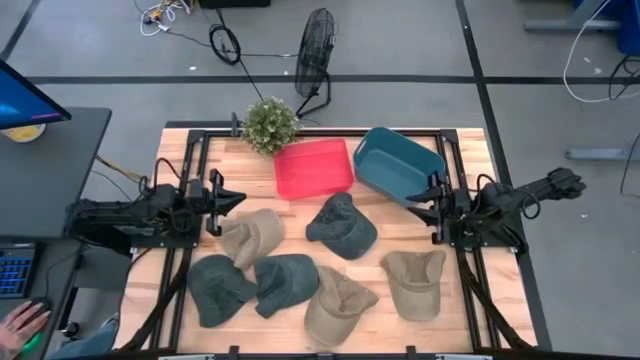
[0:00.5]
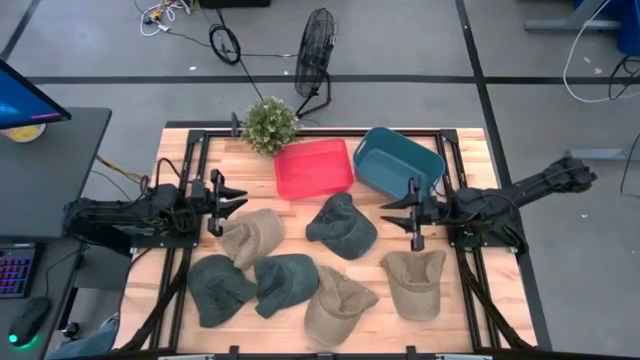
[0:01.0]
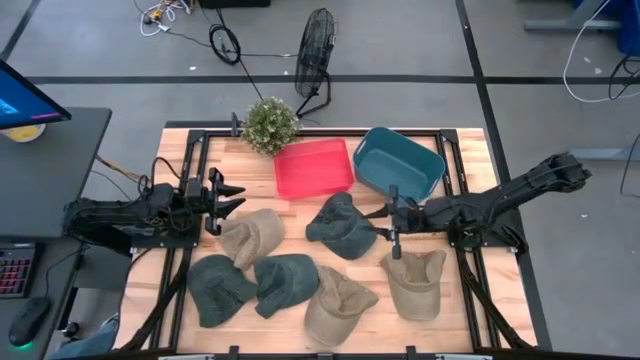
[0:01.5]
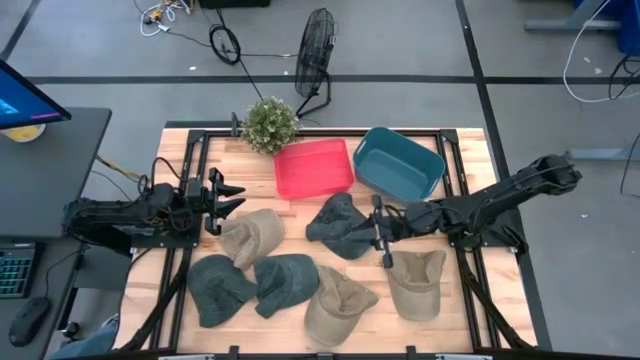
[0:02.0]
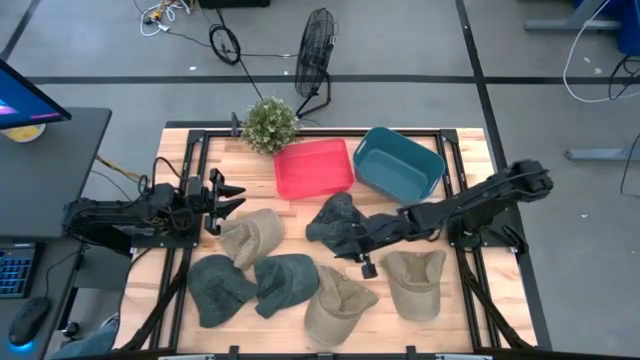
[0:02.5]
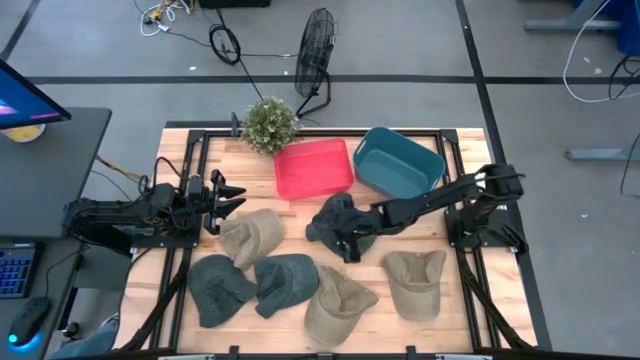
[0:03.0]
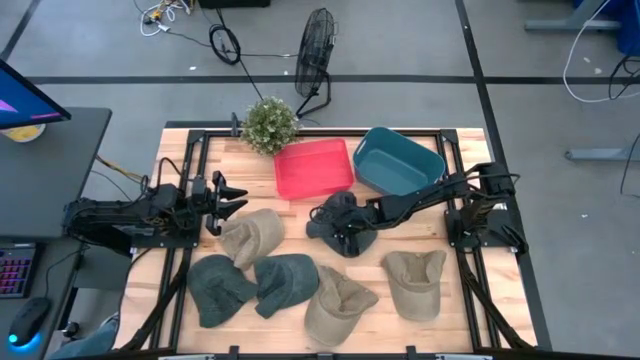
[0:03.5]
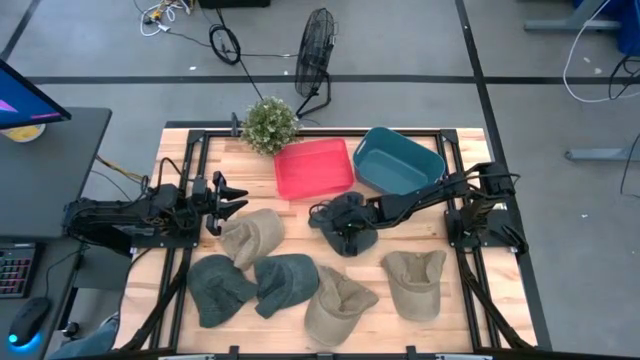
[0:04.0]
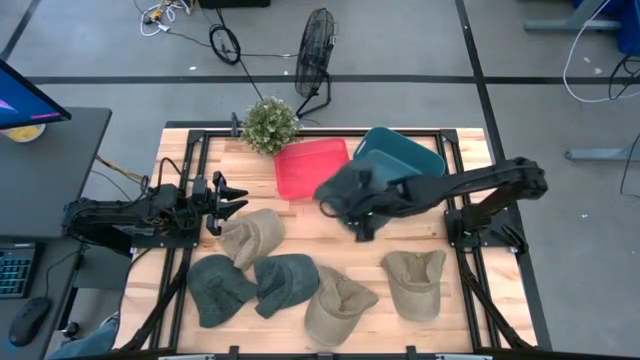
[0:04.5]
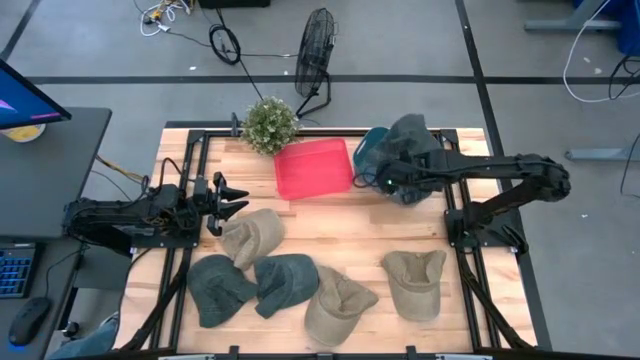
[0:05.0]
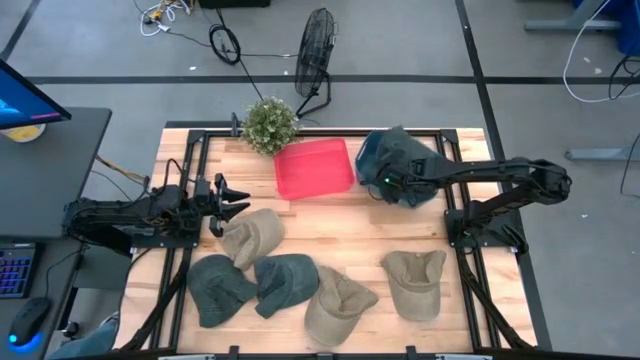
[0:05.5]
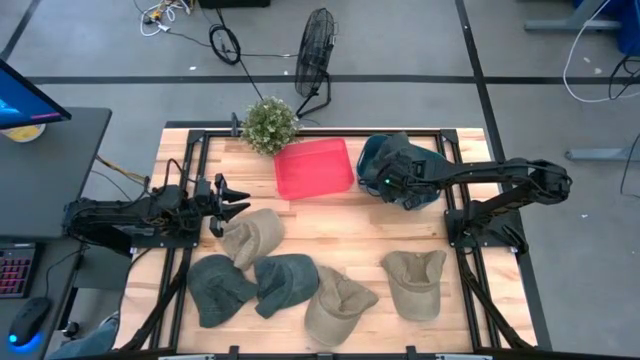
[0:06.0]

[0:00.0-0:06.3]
Task: Pick & Place hat
Put the top black cap into the blue bin

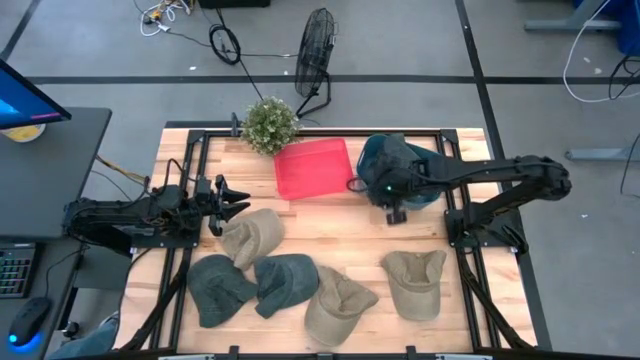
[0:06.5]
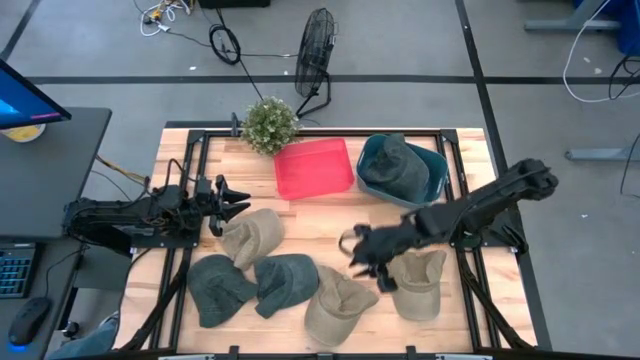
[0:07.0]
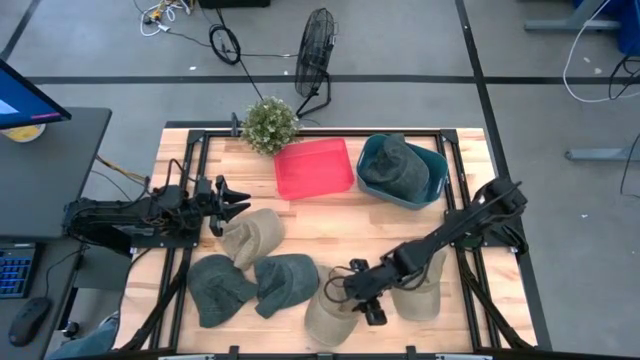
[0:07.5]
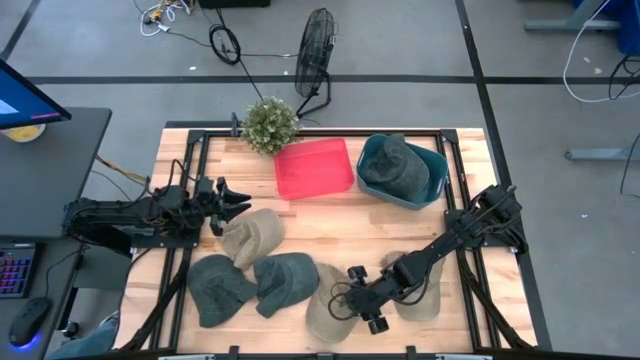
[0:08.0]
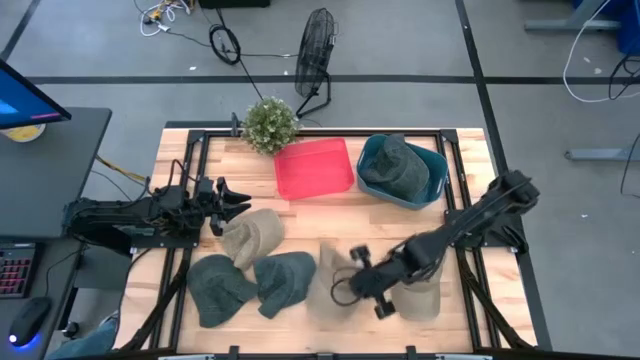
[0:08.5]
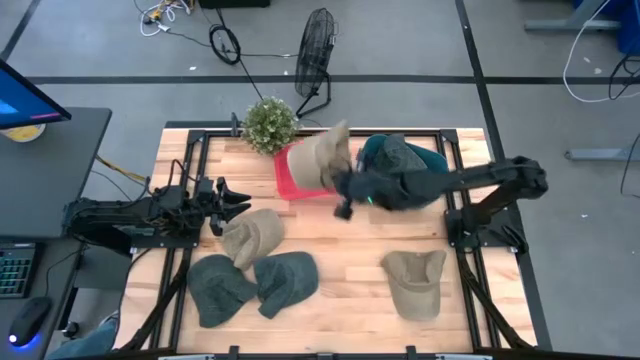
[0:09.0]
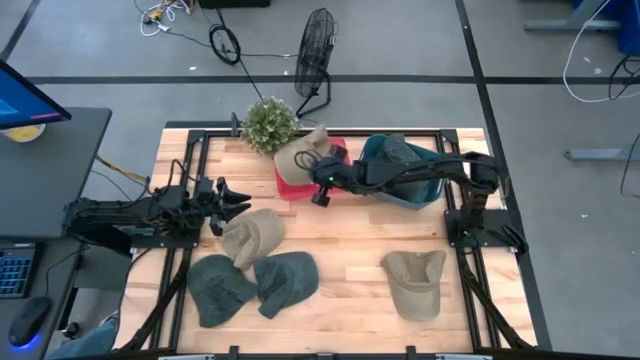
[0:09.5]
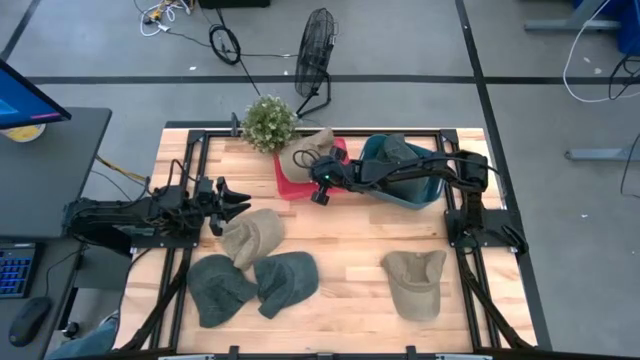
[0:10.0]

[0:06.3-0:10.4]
Put the right brown cap into the red bin

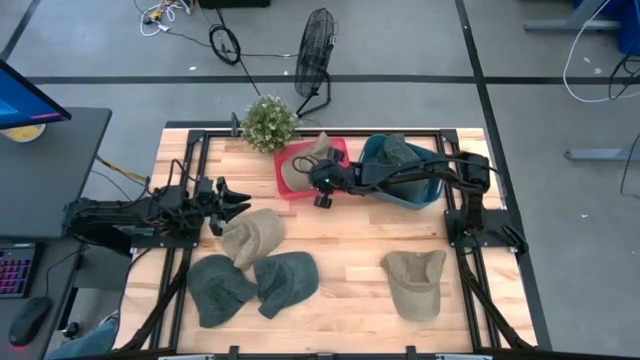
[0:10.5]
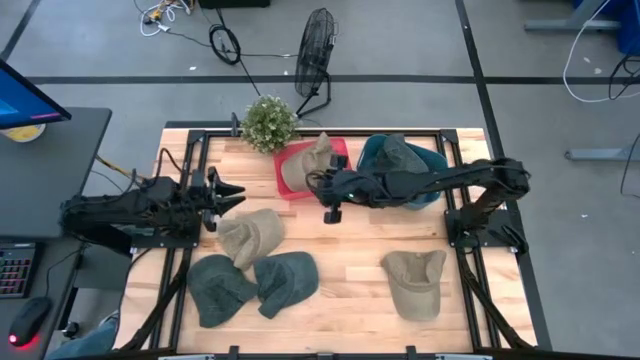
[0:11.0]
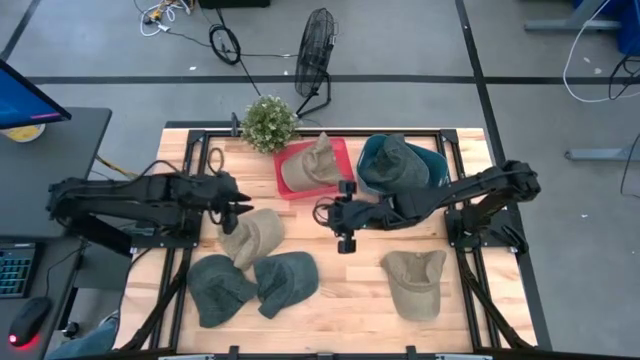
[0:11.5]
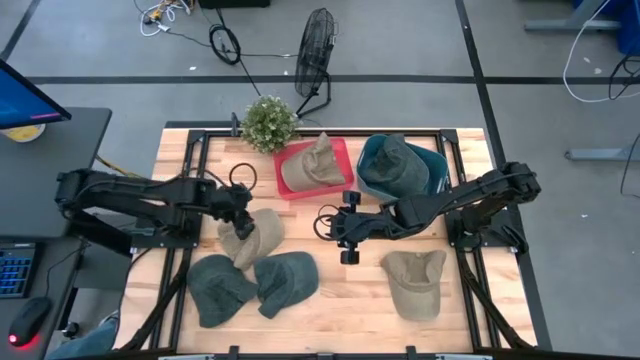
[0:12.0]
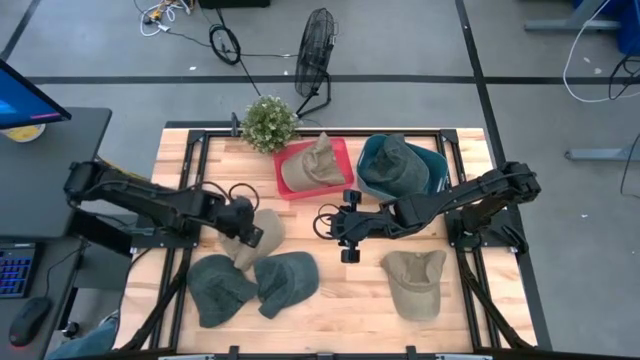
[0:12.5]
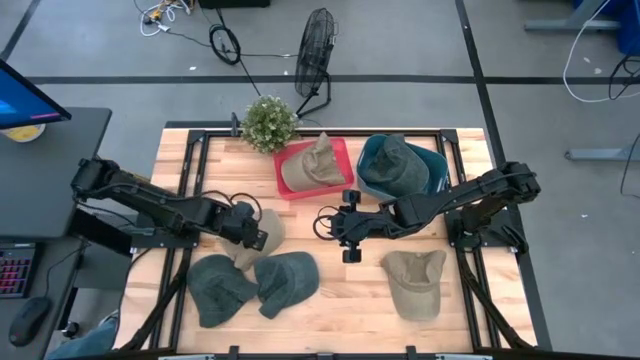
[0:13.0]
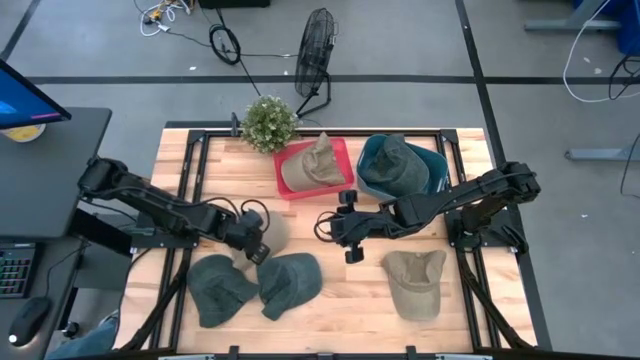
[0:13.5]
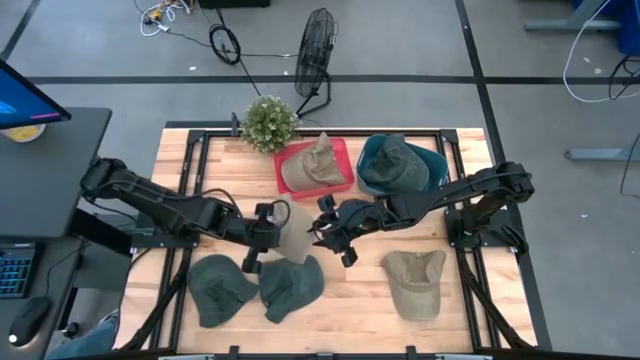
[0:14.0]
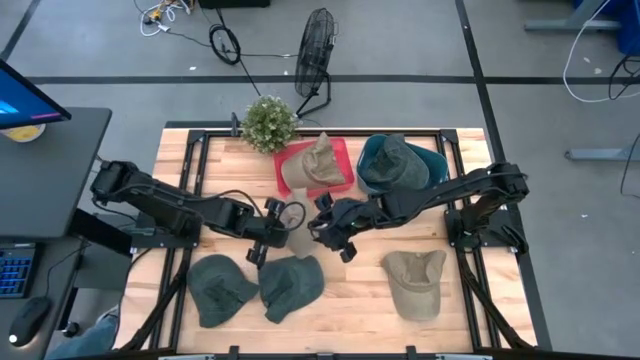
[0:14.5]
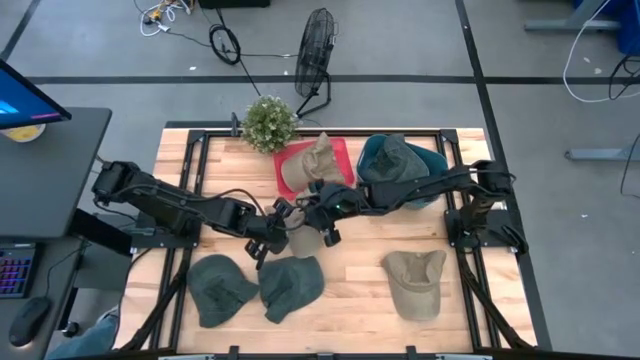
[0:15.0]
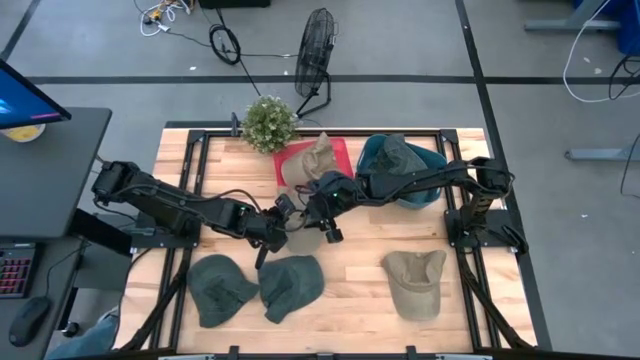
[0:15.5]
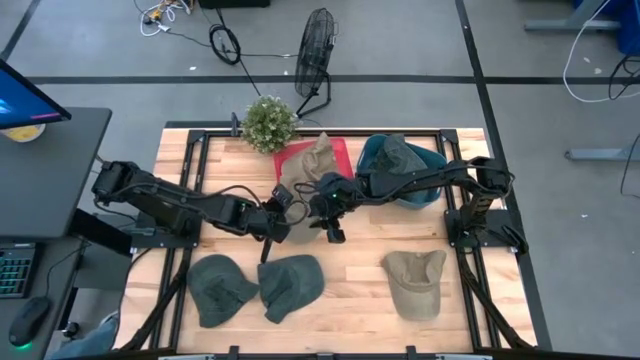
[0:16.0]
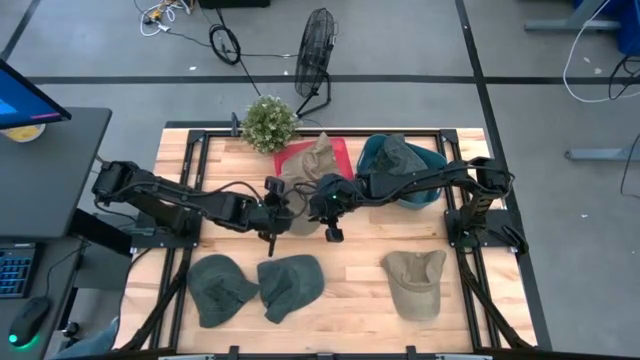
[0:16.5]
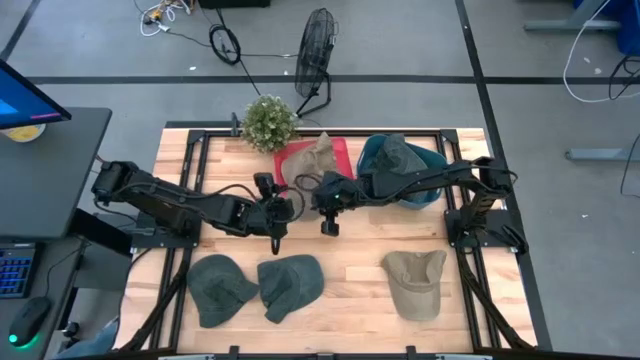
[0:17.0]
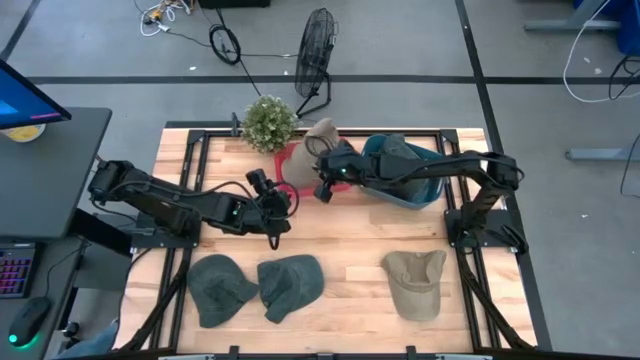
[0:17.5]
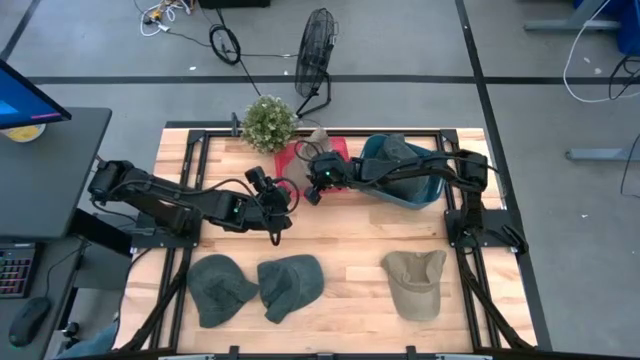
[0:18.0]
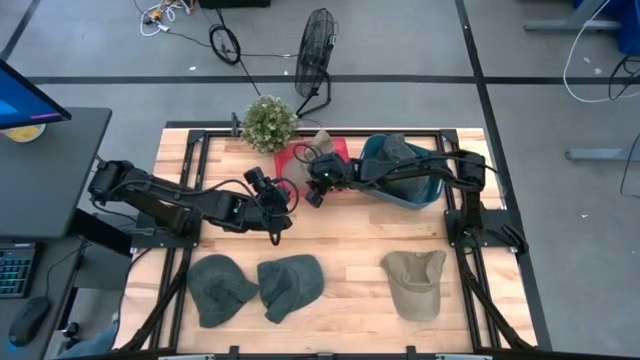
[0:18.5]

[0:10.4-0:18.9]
Put the left brown cap into the red bin

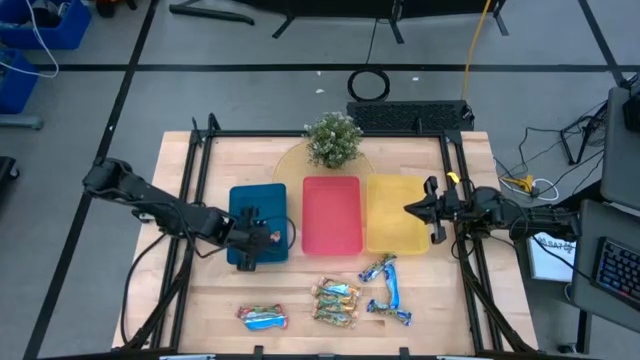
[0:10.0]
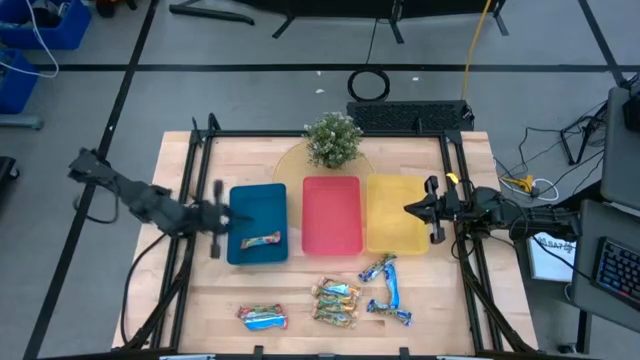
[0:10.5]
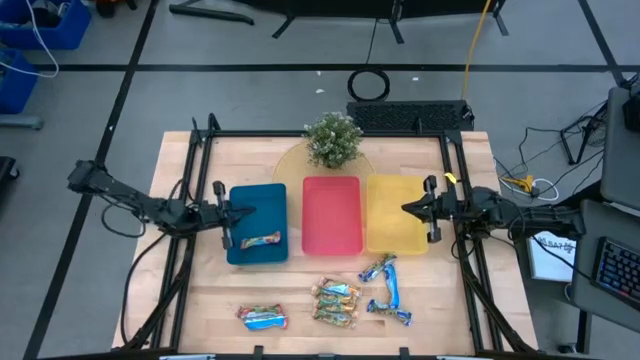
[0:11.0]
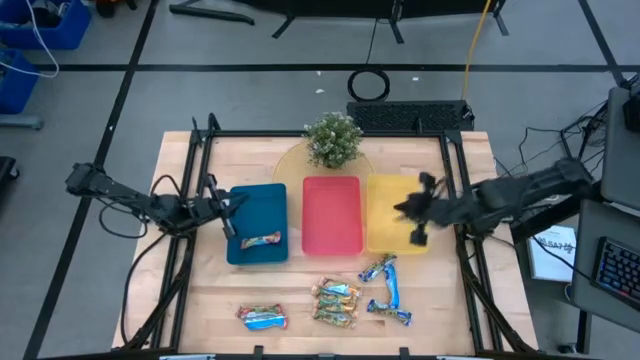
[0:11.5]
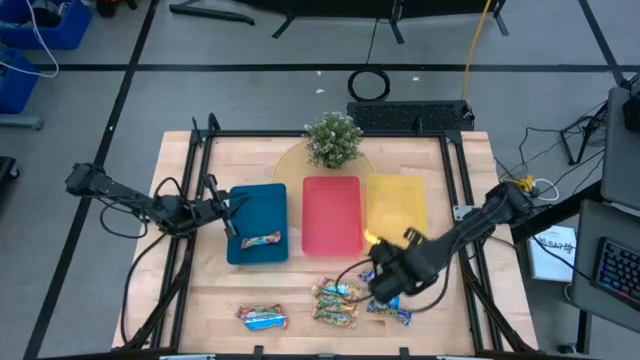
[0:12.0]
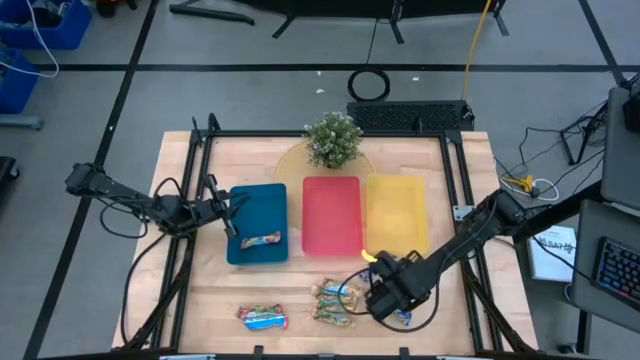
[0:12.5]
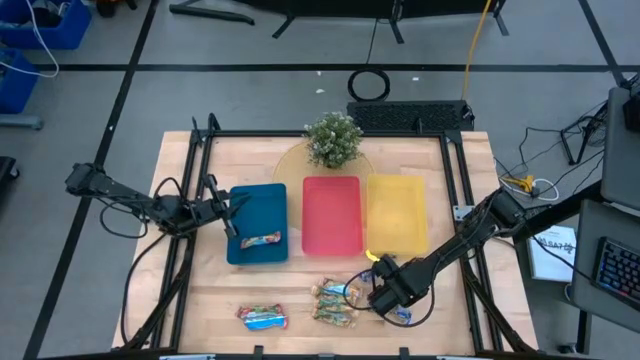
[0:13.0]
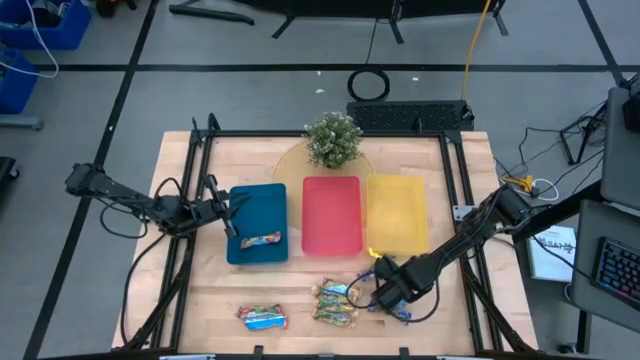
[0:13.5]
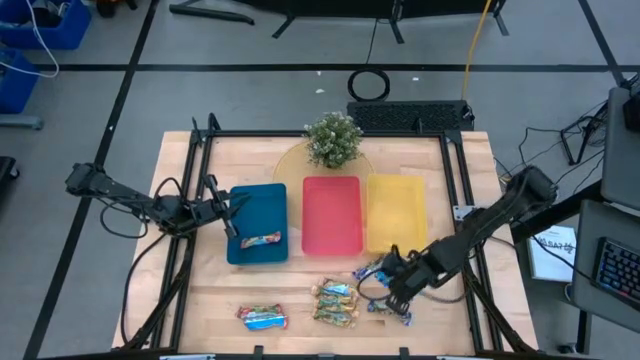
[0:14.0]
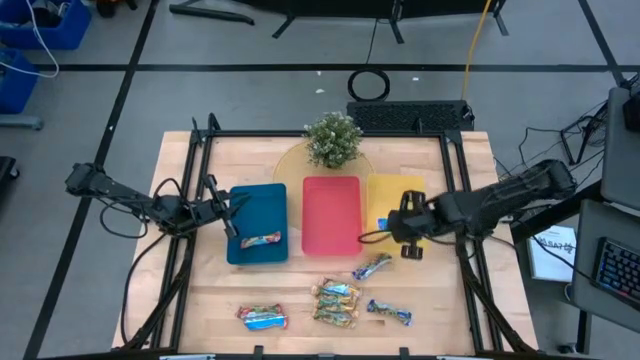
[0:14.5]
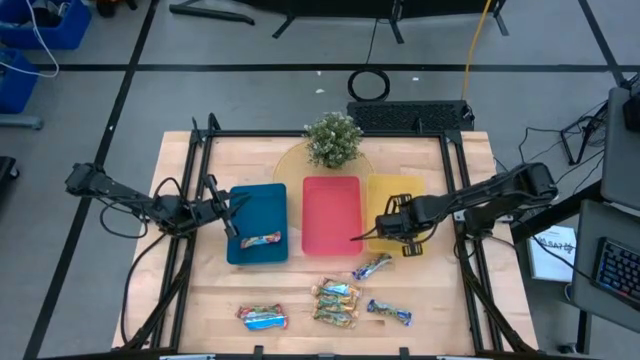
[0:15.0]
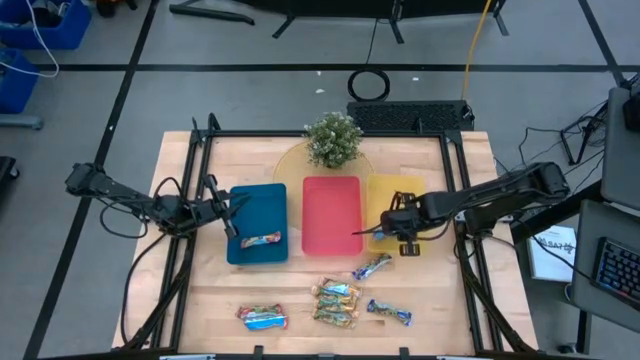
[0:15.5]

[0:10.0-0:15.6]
Task: Pick and place Granola Bars by type
Put the blue granola bar into the yellow bin
